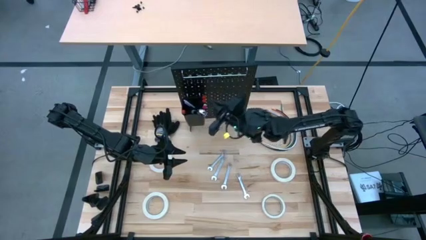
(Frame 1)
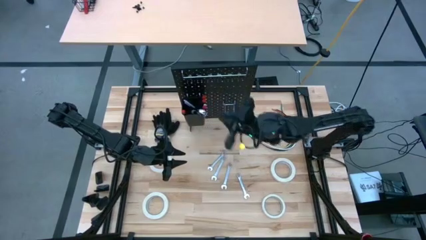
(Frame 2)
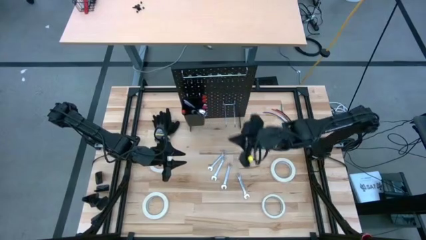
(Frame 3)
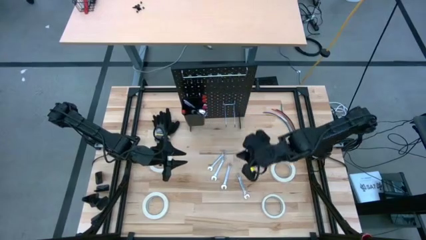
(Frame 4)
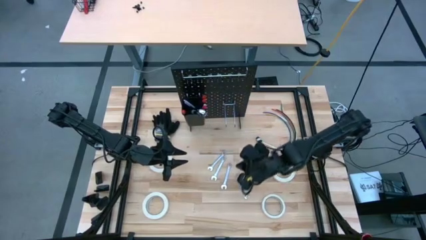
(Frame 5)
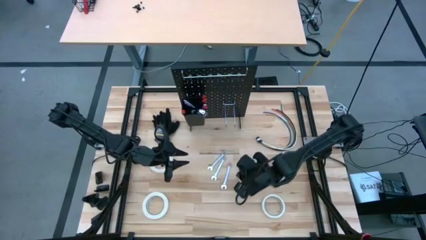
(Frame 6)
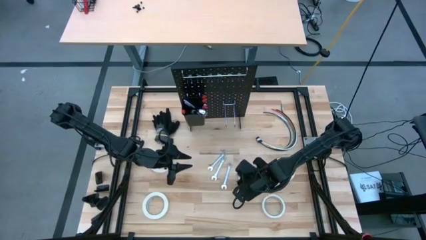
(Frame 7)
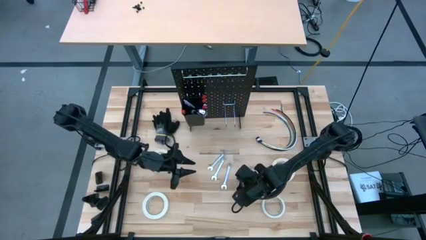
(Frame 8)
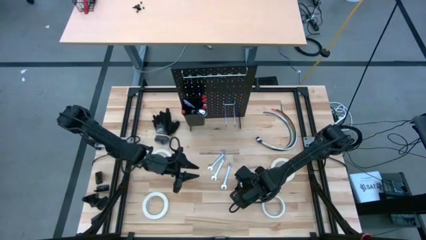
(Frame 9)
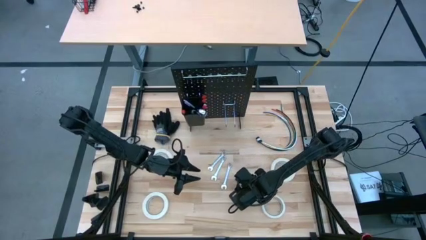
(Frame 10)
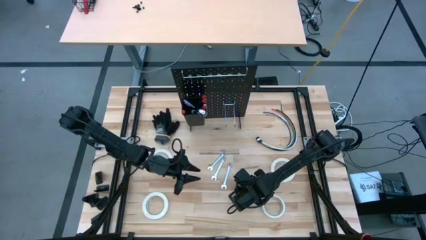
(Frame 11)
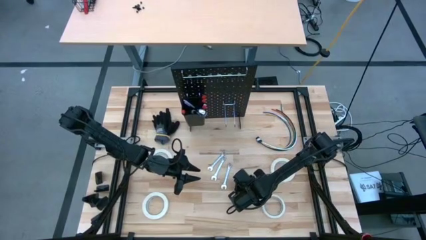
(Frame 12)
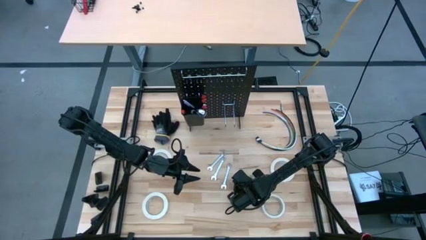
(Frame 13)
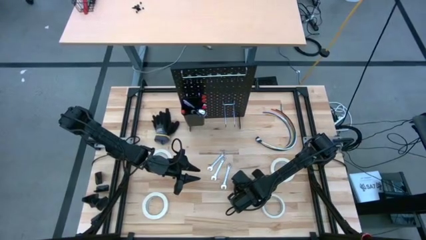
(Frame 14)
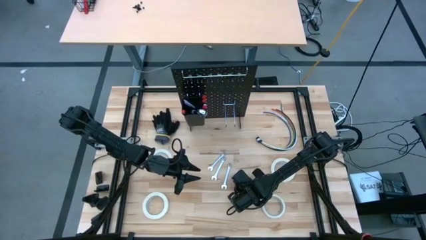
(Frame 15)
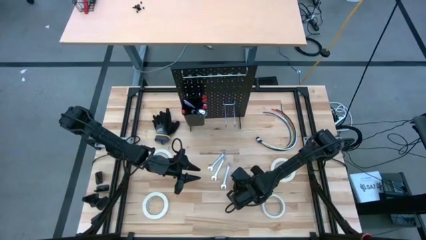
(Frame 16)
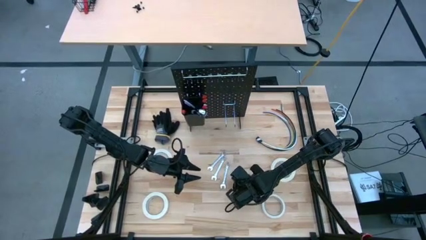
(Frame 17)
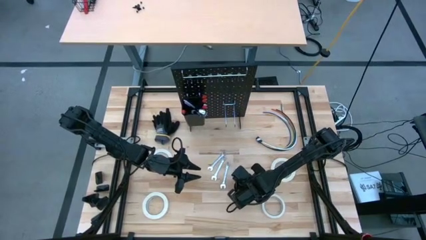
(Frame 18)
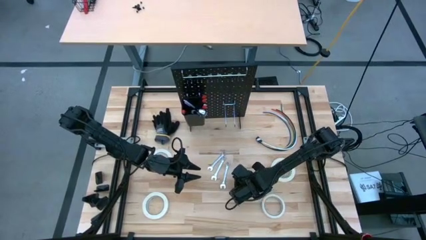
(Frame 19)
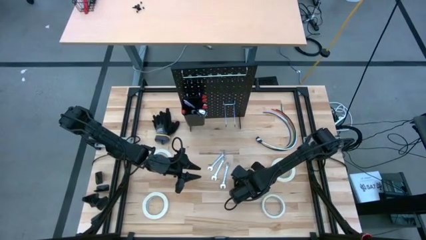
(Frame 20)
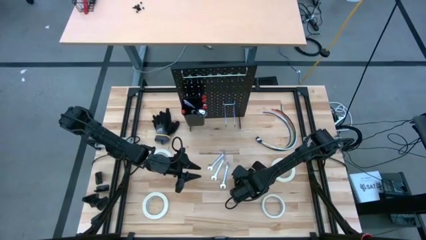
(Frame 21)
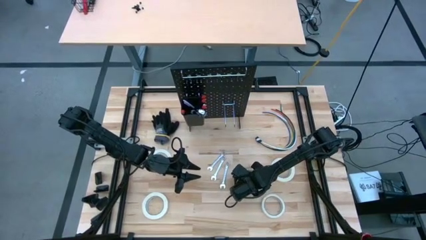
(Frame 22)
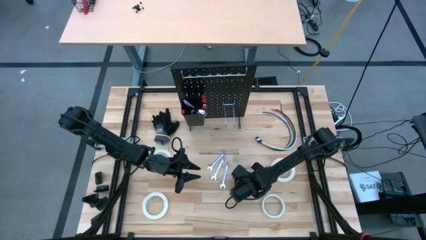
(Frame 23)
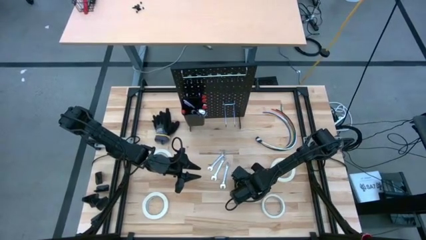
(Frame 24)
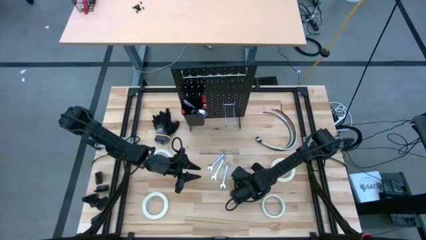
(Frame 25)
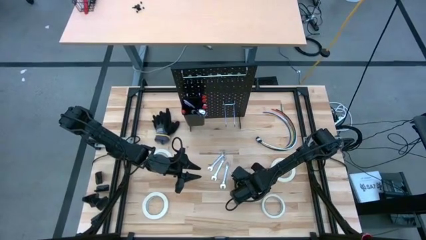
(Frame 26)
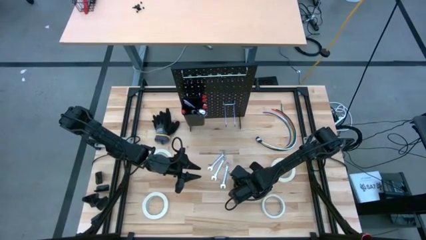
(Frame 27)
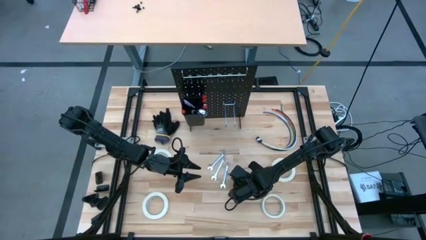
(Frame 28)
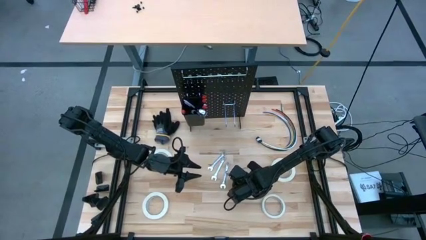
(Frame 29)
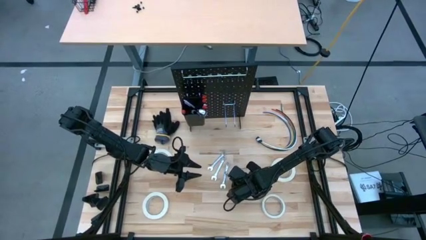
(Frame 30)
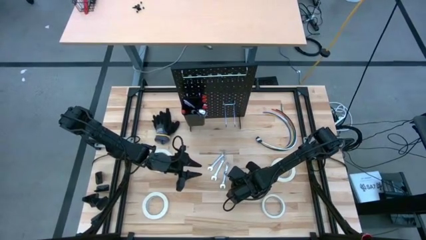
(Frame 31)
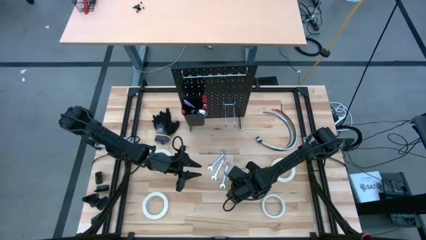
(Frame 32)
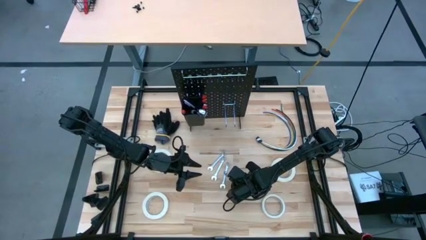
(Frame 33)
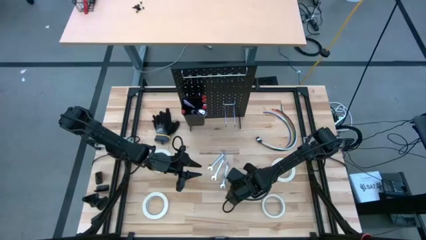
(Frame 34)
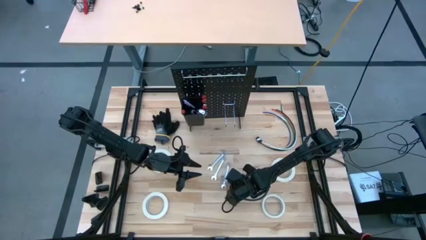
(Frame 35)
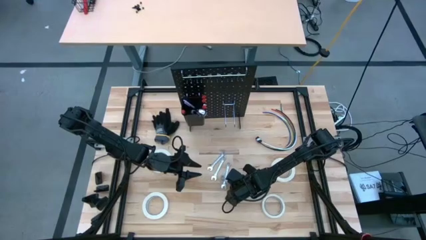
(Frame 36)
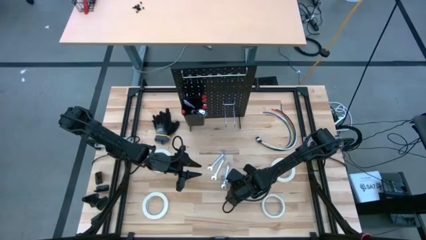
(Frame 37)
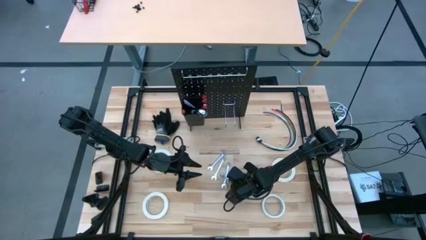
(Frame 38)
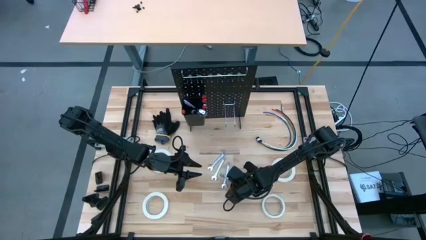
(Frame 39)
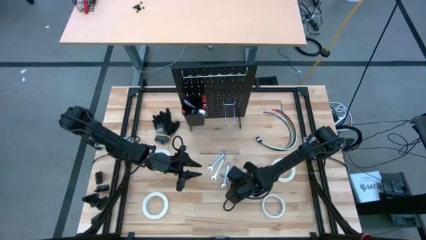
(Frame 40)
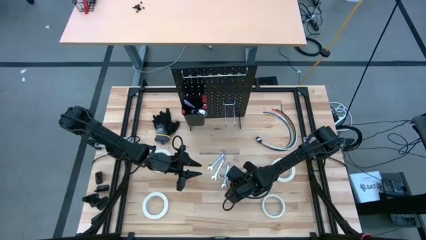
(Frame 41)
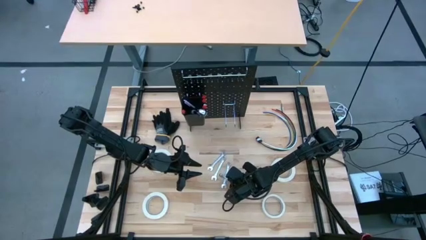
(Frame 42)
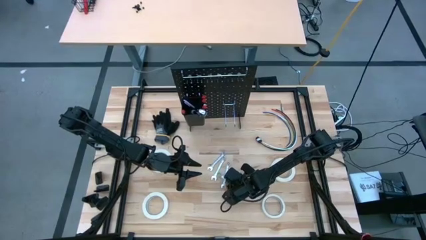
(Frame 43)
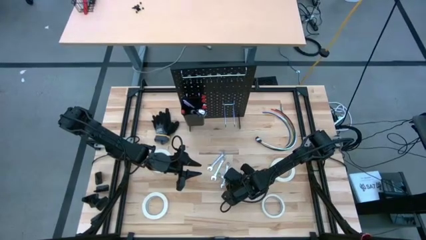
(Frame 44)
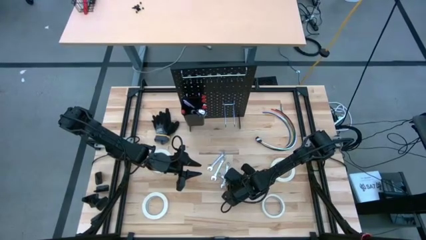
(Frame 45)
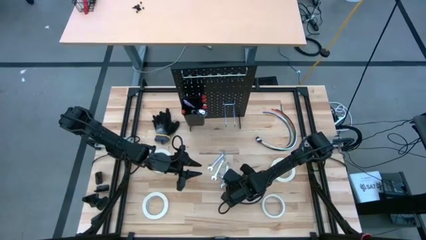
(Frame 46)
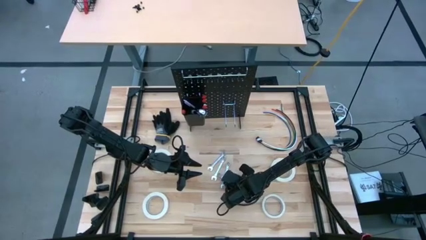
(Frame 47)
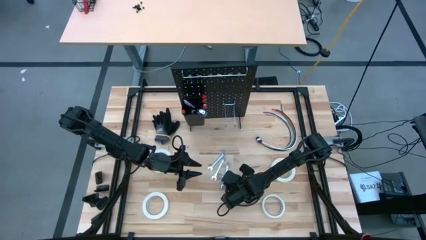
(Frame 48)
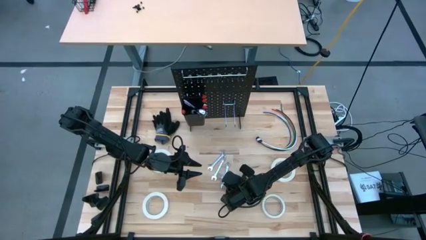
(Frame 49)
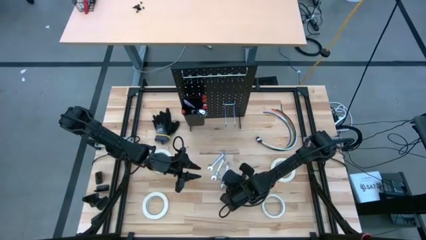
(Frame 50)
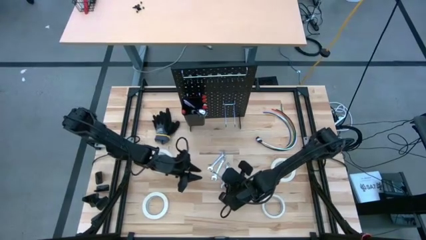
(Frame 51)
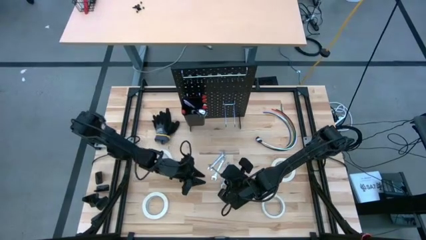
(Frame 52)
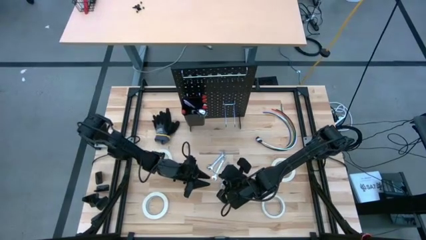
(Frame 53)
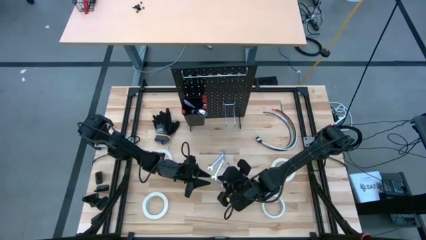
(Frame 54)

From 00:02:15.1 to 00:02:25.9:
Task: Hang tools onto peg board
Hang the wrench on the peg board
